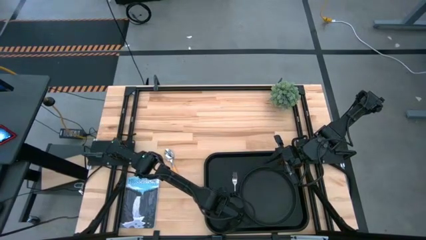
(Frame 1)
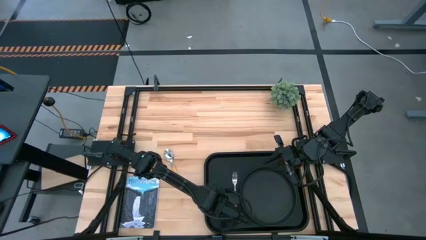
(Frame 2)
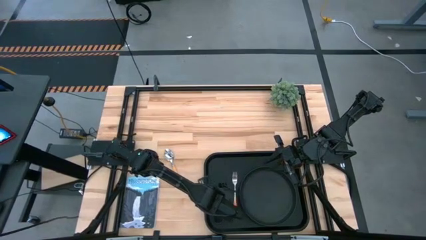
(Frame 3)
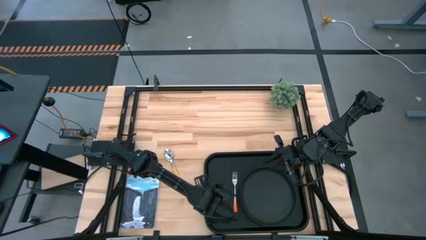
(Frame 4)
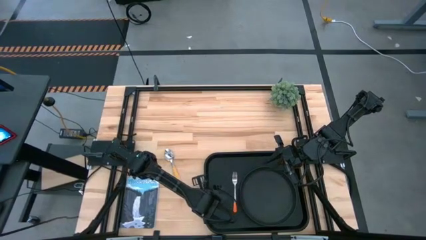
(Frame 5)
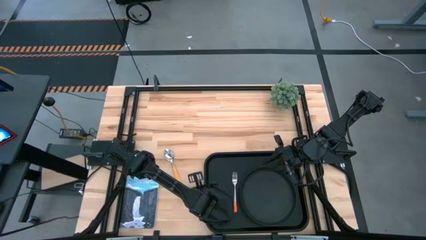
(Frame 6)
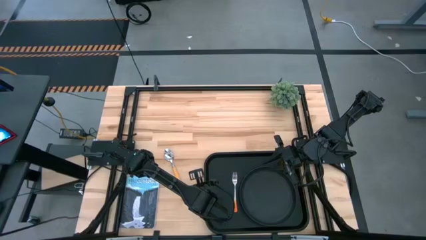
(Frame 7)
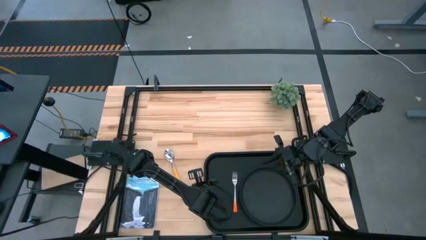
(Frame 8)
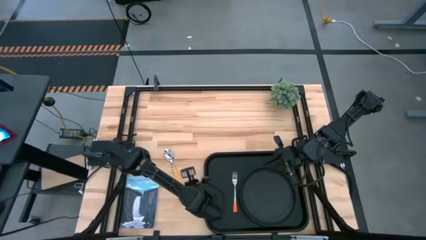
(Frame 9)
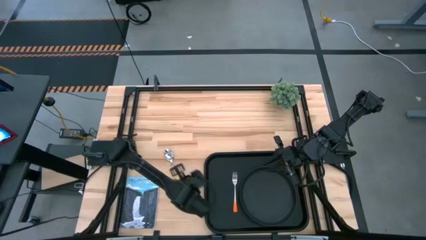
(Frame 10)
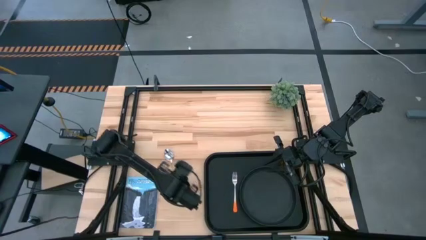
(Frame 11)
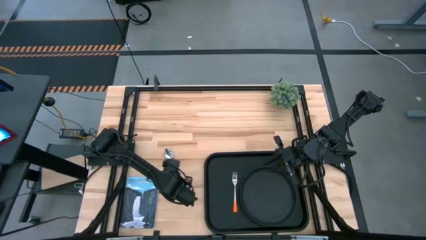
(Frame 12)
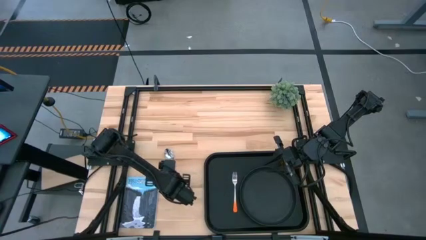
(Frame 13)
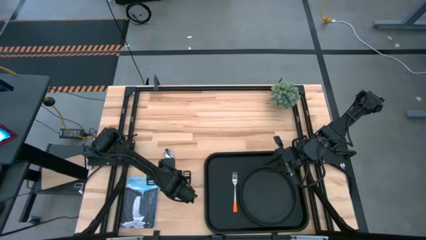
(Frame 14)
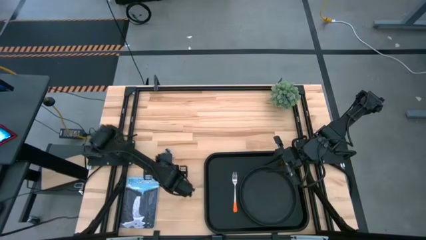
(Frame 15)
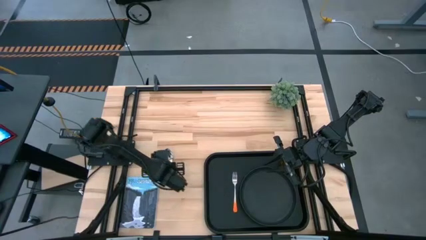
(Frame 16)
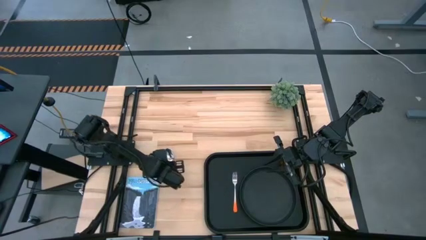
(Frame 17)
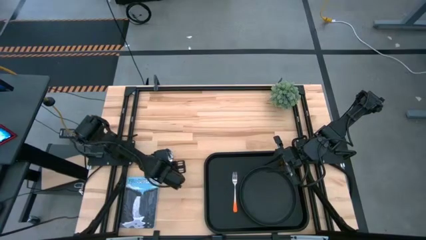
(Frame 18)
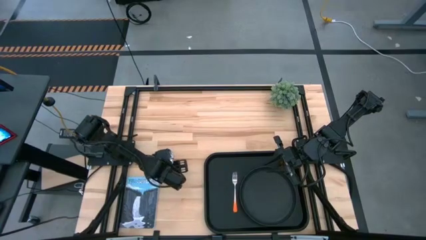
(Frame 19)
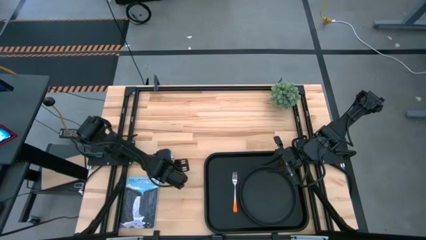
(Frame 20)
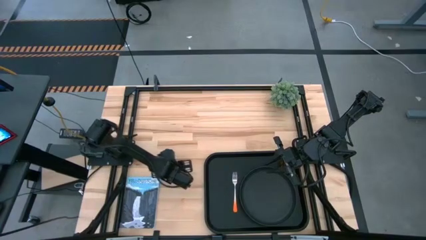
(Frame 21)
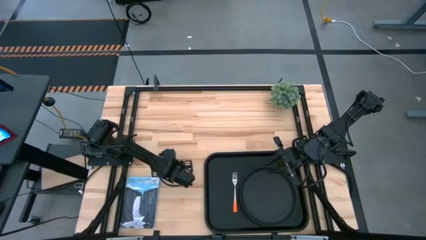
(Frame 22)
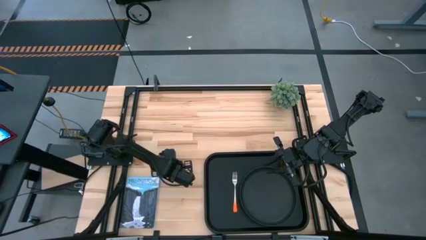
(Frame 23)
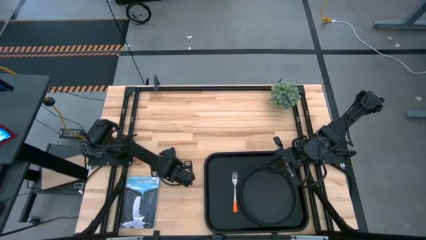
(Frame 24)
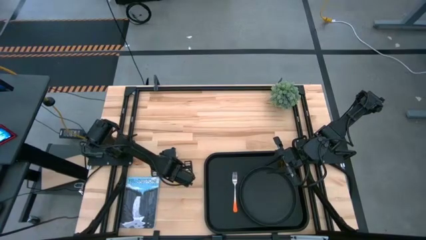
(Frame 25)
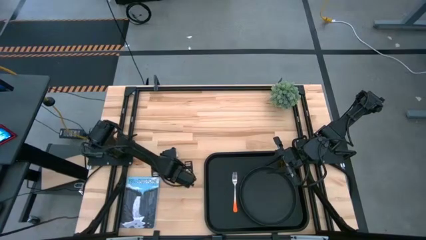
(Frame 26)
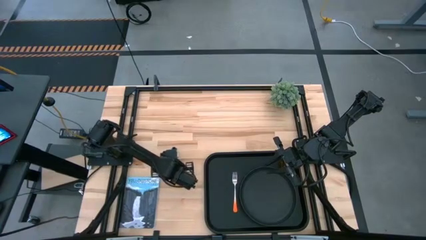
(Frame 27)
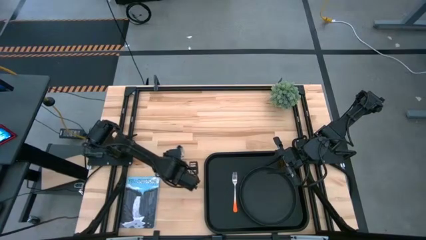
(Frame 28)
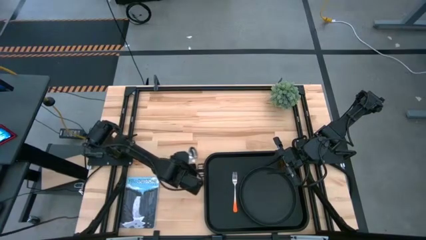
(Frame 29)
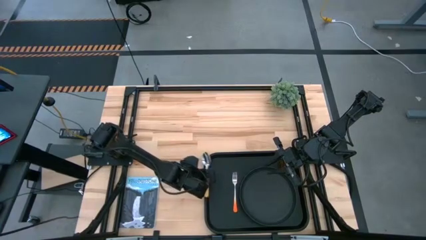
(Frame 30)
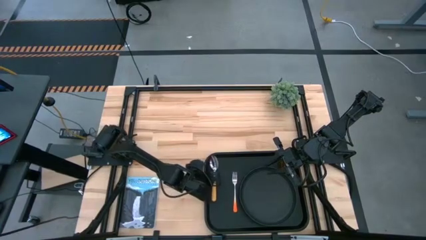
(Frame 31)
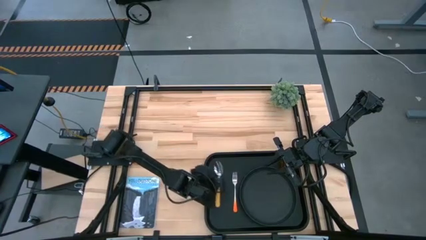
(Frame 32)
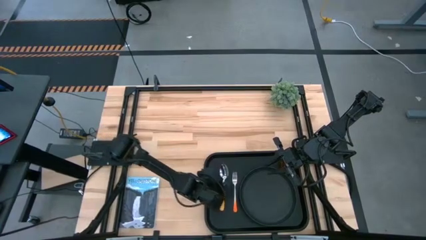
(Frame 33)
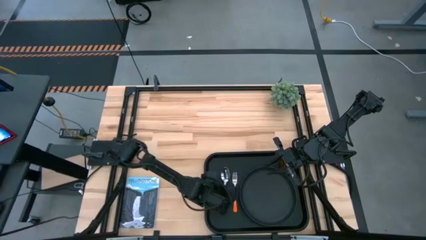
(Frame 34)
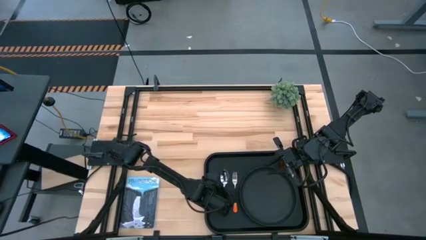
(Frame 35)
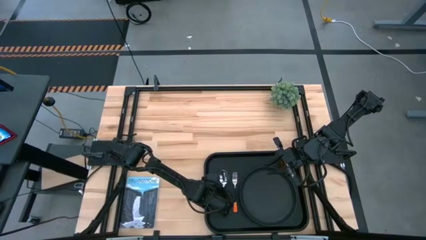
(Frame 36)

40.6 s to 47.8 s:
Task: Pick and place plate/cup/fork/spoon on tray
Put the yellow spoon on the black tray to the left side of the orange fork

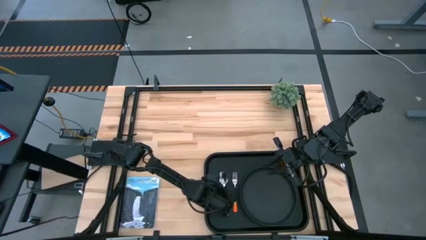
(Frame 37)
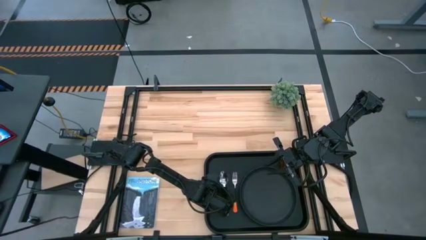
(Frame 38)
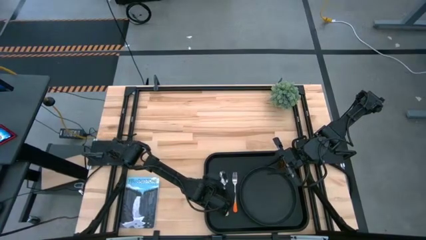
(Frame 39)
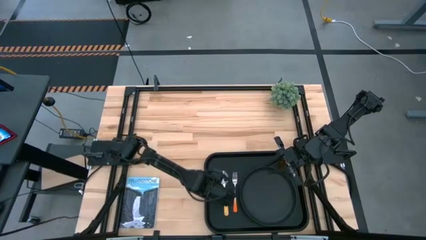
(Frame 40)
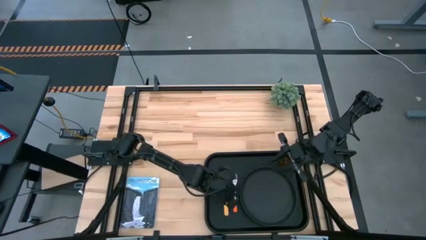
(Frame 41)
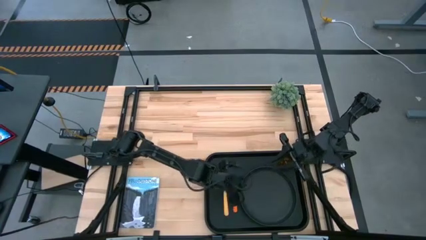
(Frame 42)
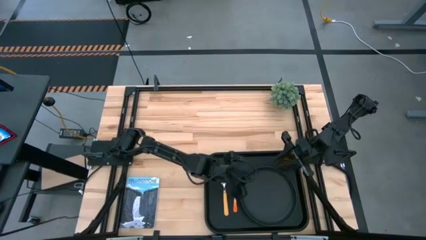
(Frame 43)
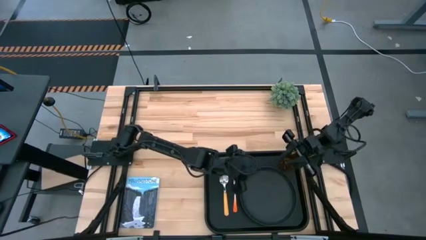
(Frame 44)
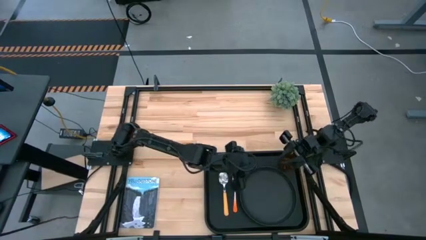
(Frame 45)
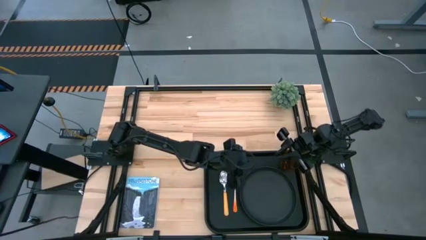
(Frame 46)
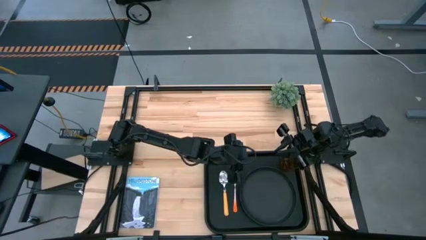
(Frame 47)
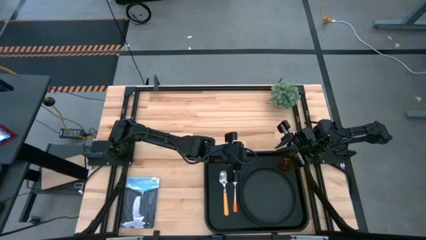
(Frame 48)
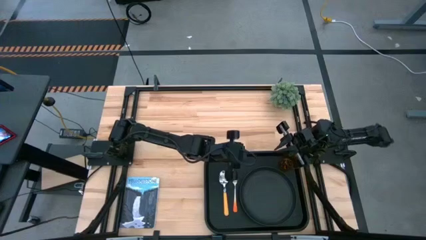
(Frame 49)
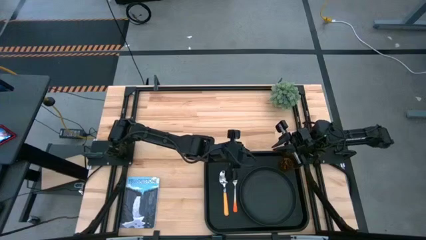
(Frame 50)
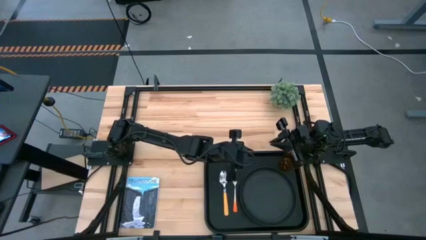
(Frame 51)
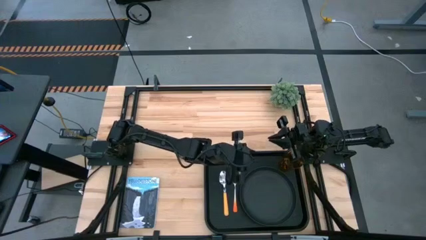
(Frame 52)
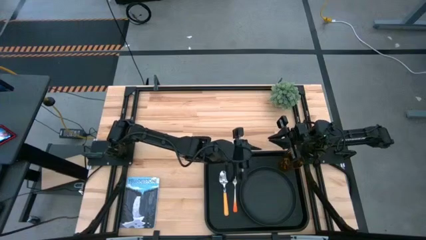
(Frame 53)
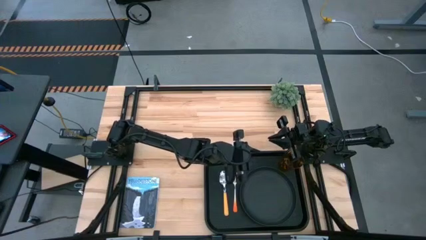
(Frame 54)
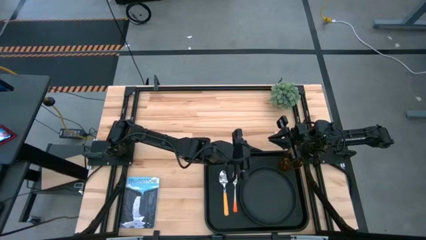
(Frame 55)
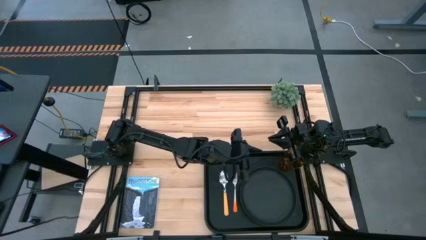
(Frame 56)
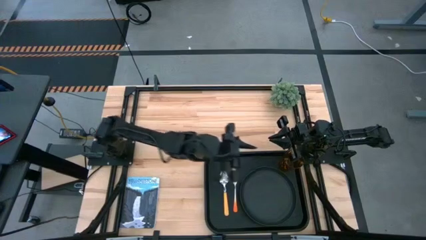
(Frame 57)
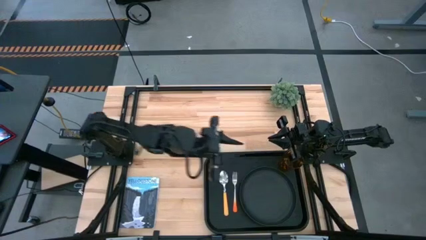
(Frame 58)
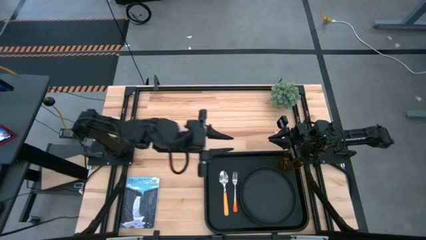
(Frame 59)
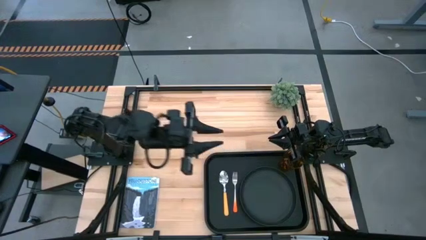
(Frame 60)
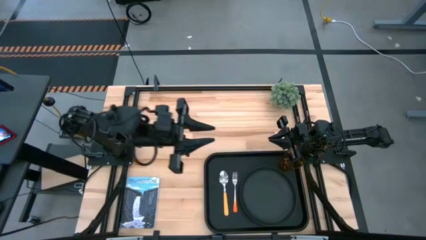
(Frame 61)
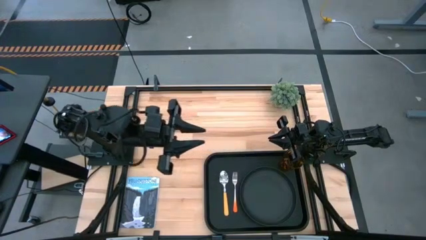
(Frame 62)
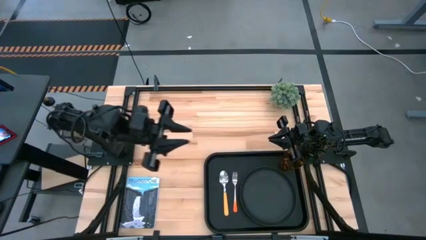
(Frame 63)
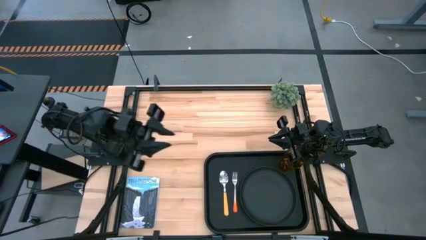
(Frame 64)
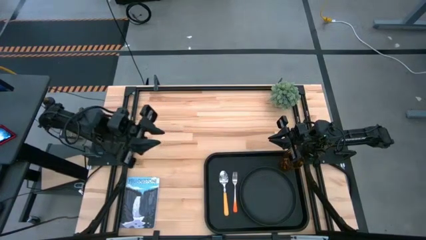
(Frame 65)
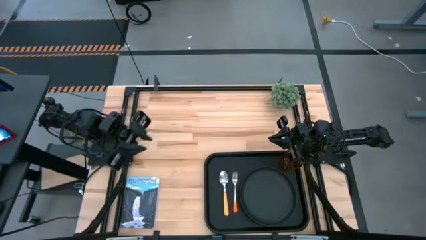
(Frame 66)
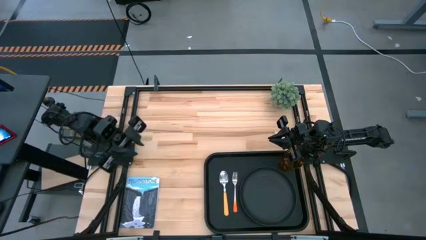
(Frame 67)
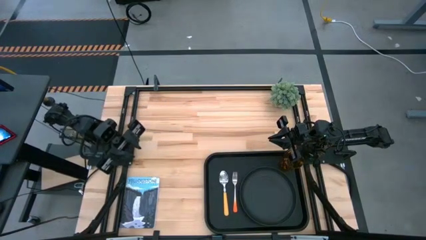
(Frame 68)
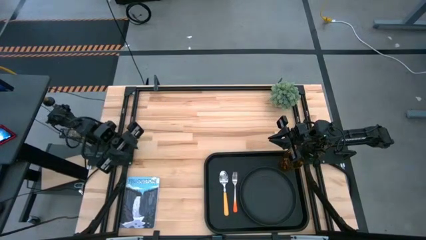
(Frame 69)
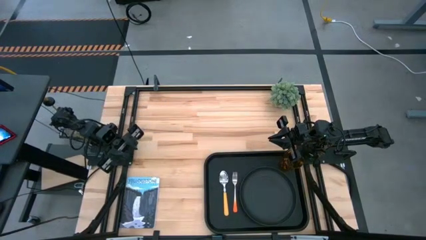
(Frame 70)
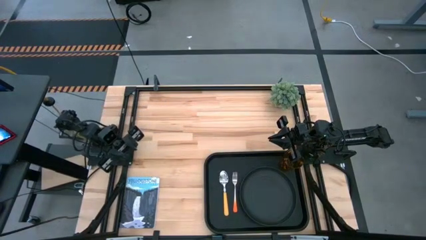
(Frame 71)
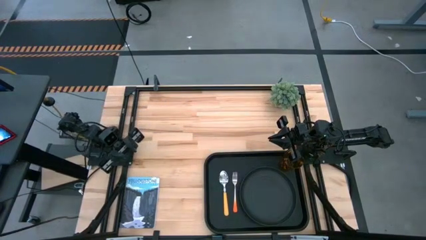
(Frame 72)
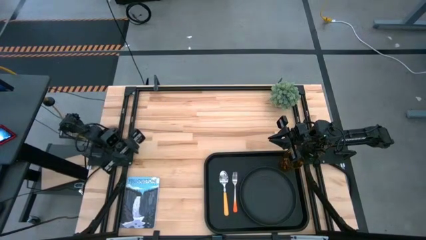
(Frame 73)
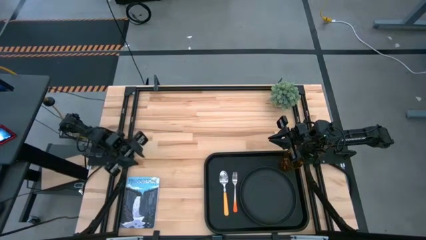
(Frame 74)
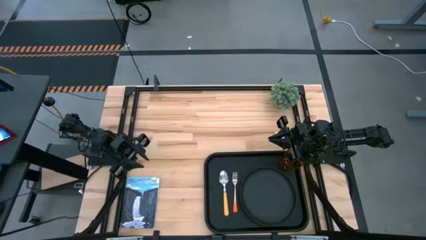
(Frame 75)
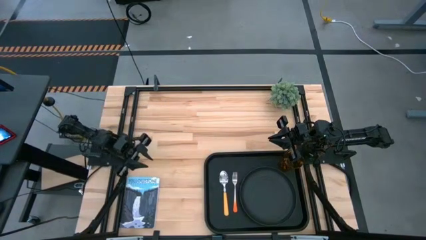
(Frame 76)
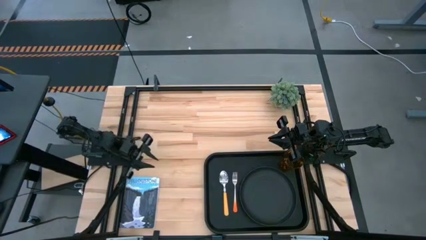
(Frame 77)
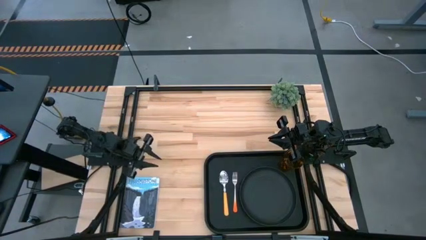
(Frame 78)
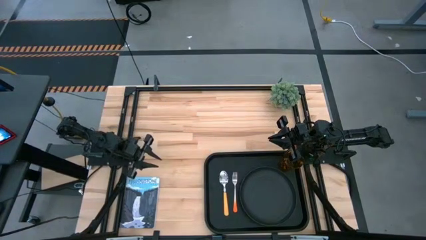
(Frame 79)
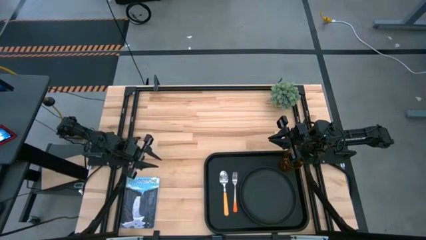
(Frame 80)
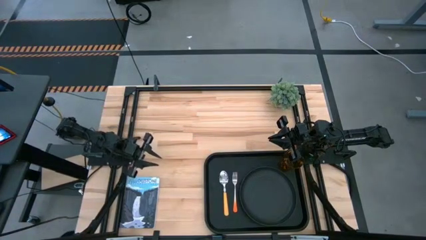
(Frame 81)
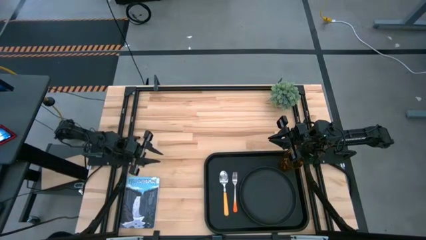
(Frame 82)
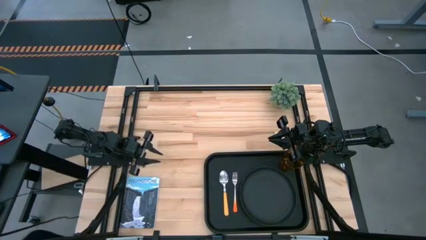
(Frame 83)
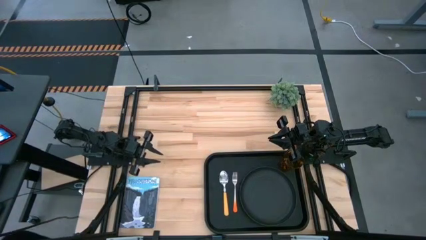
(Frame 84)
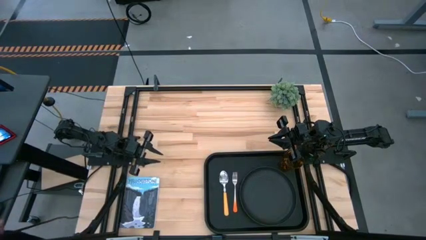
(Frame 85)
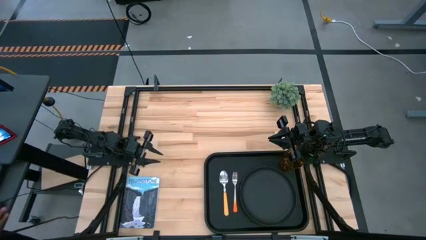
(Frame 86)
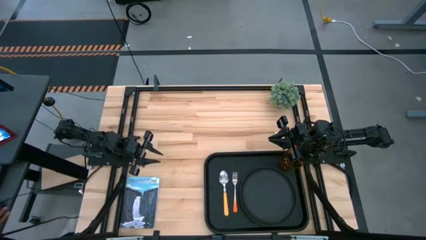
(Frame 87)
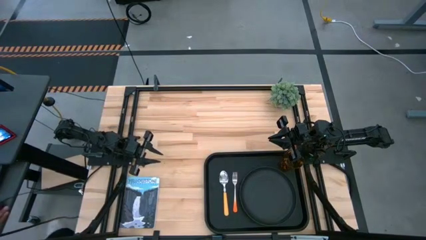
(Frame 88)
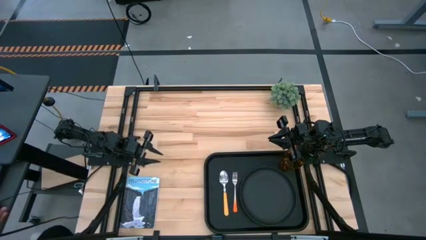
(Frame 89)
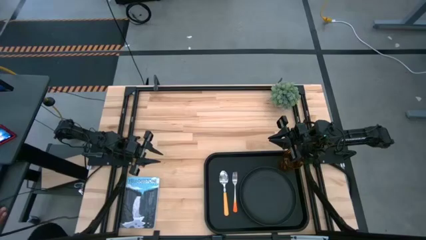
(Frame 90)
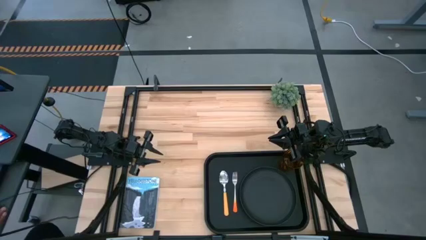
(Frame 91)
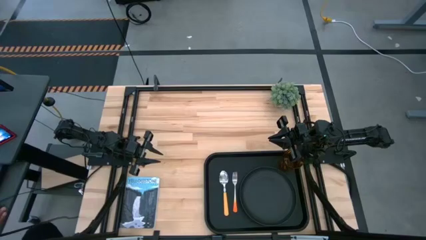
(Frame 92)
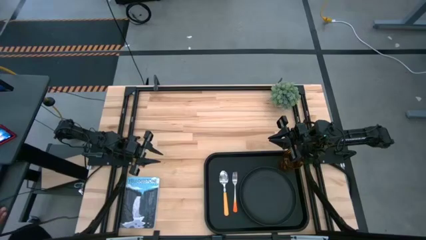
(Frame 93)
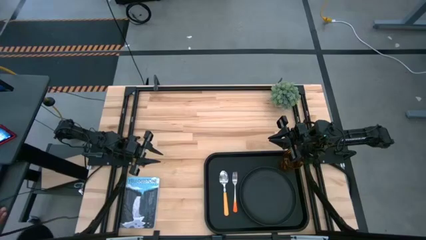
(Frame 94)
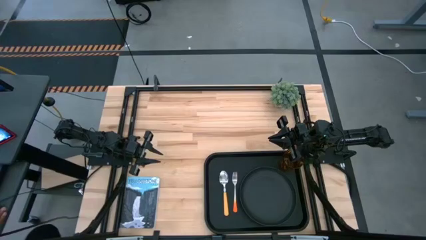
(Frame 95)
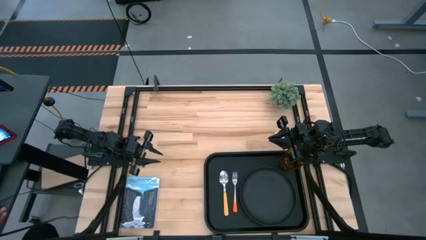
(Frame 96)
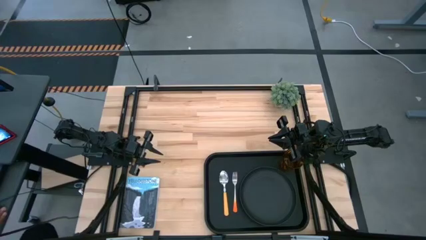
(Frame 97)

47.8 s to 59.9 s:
Return to Home Position
